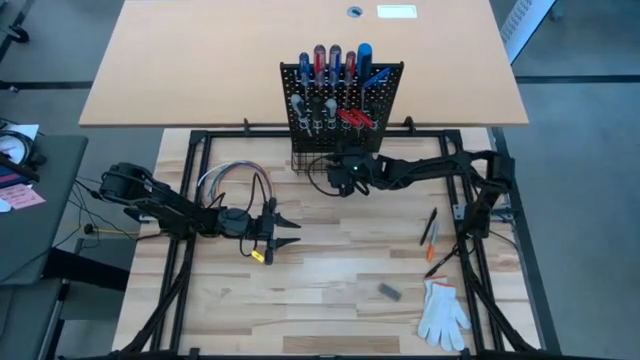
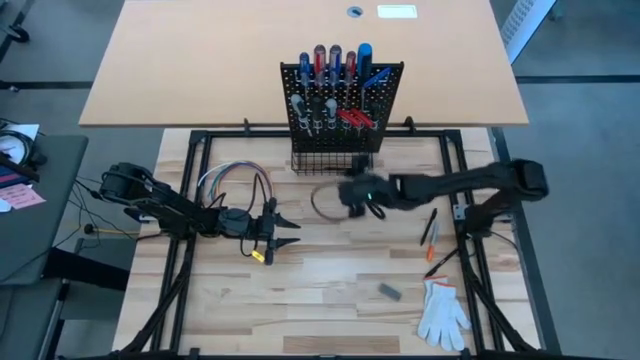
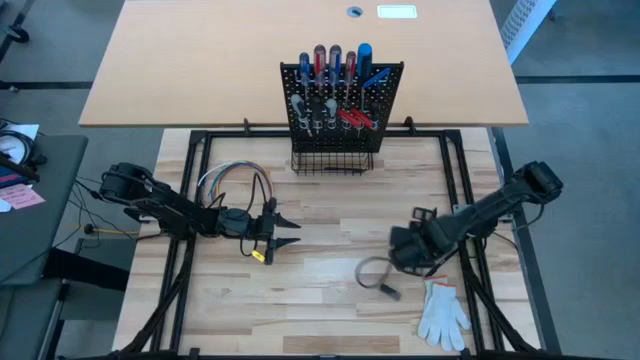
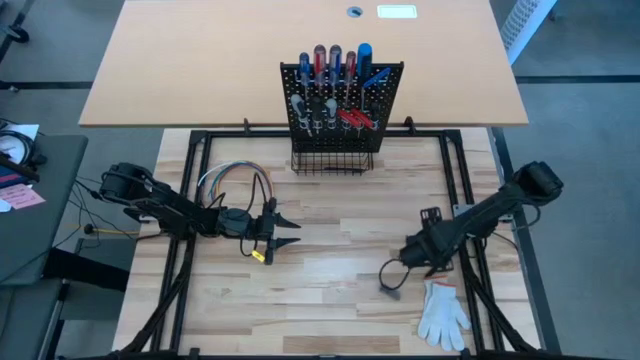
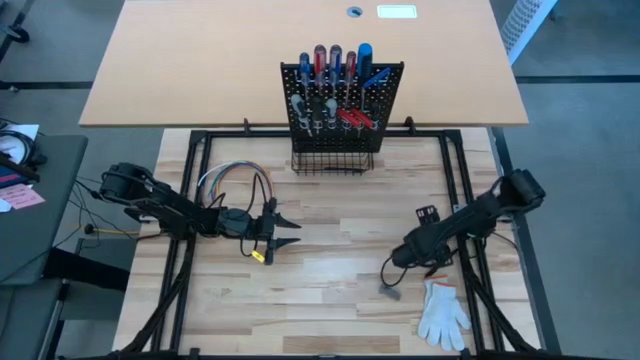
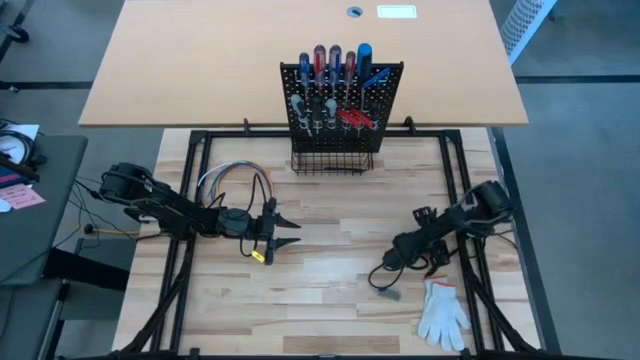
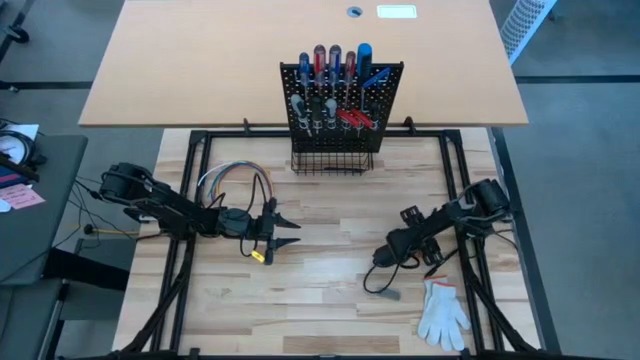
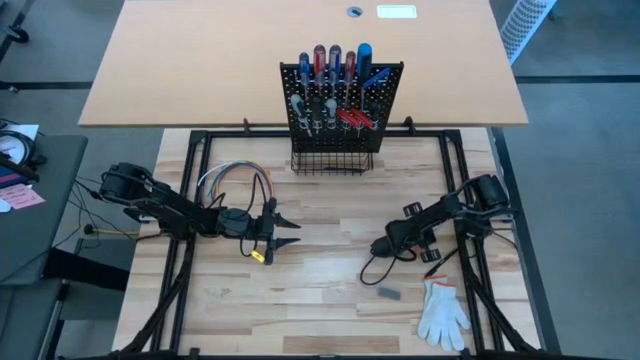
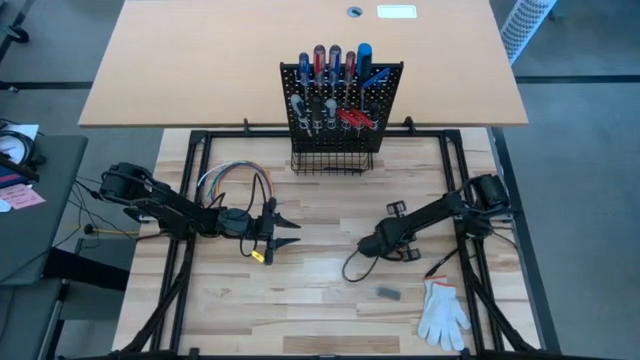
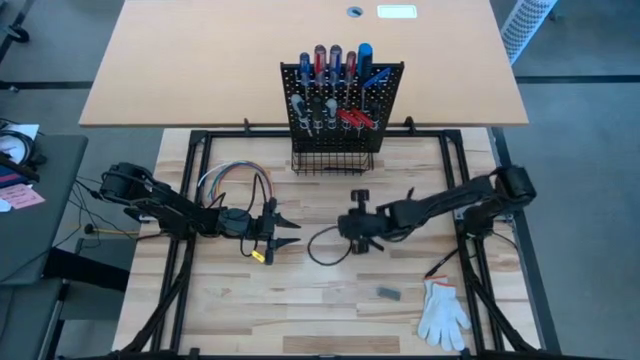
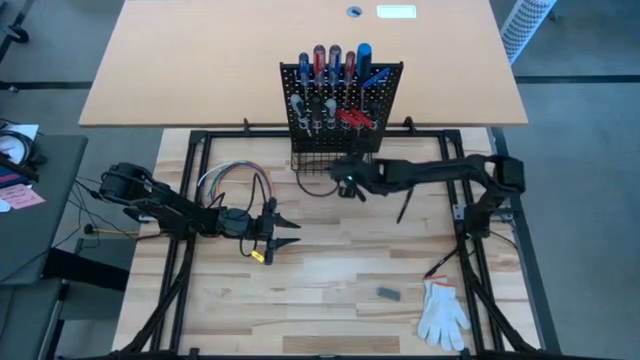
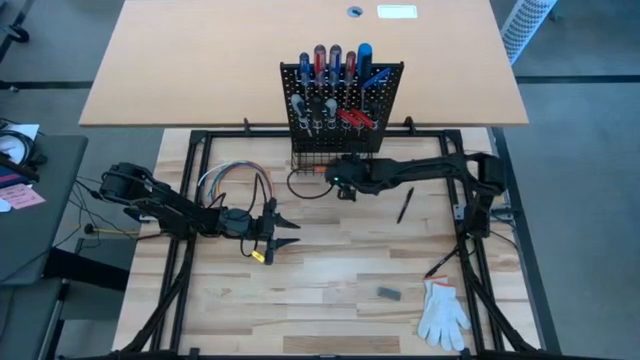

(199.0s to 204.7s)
Task: Hang tools onto peg board
Put the orange pen into the black basket

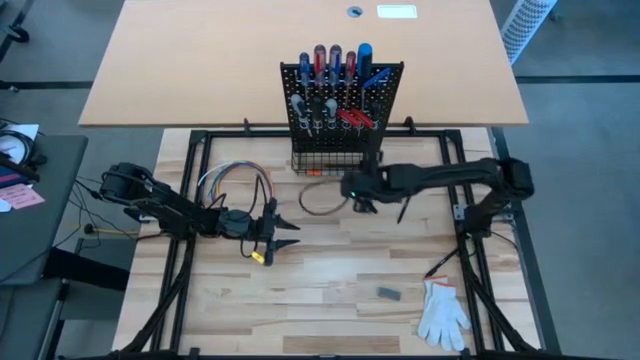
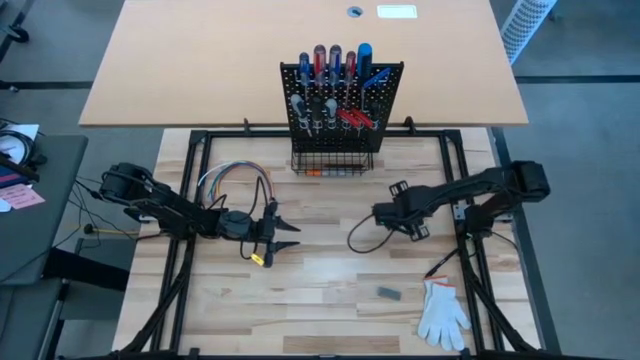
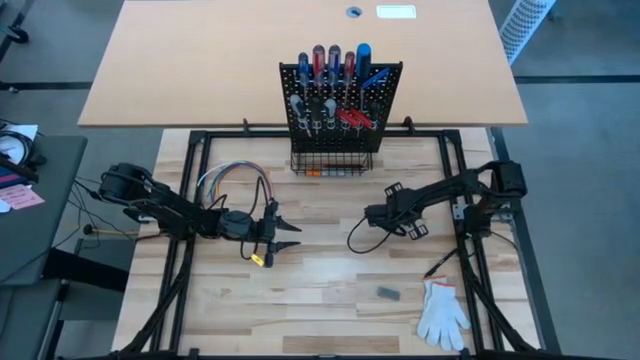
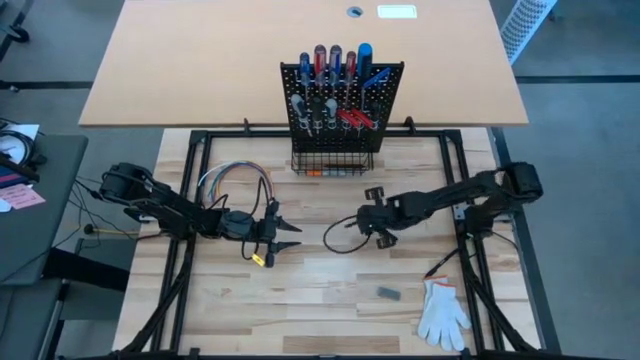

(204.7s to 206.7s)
Put the top black pen into the black basket

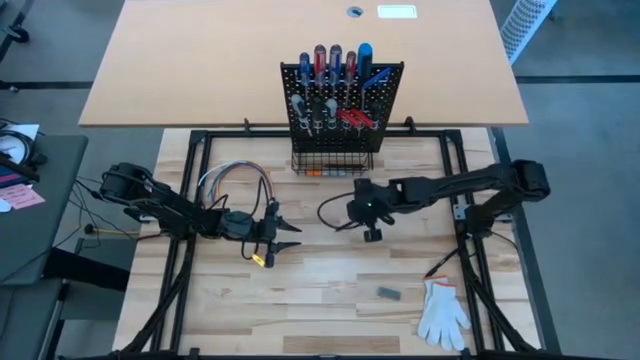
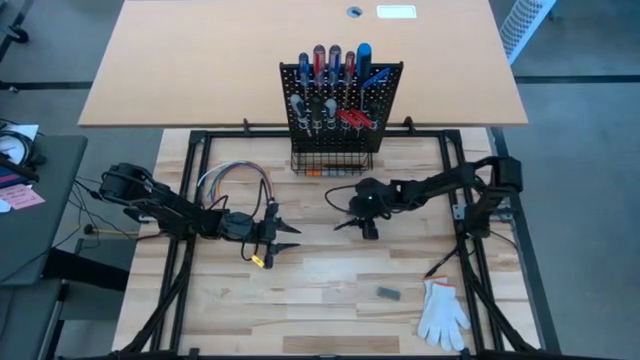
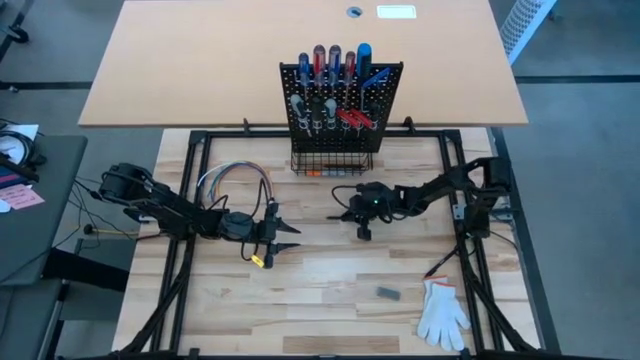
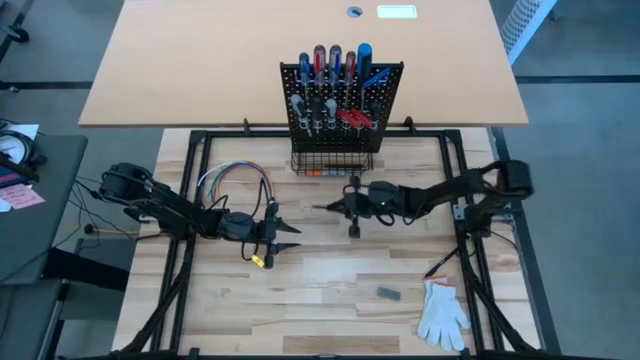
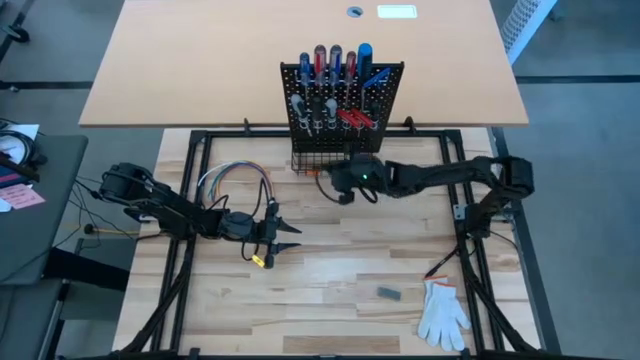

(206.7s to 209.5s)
Put the top black pen into the black basket

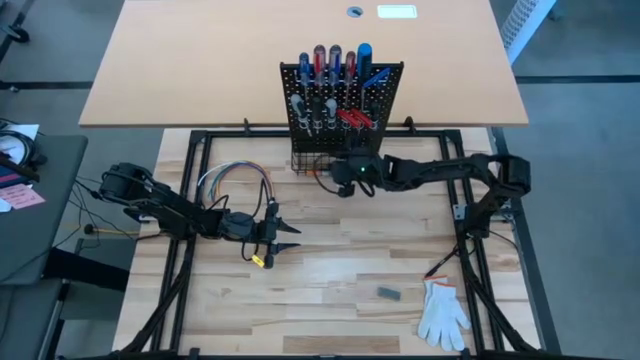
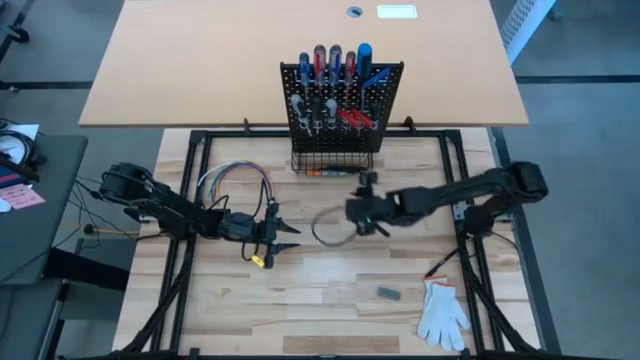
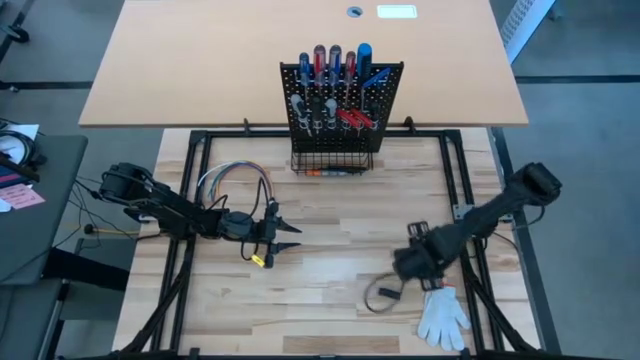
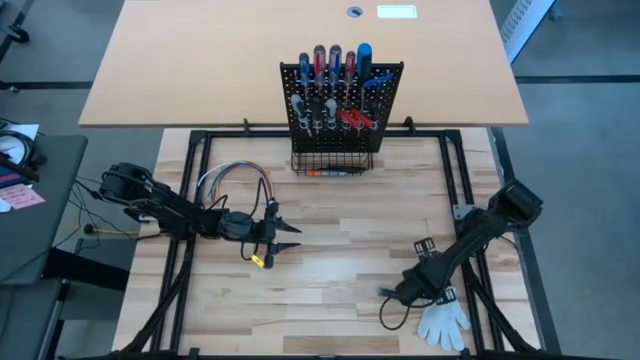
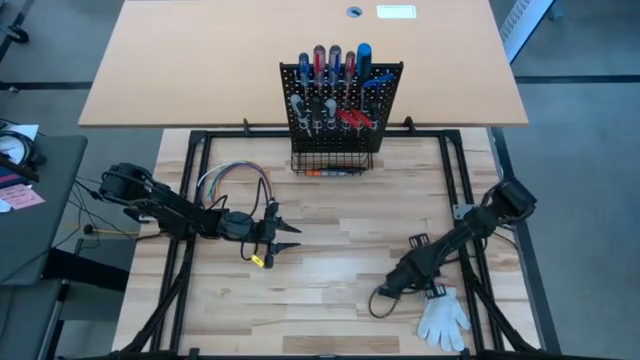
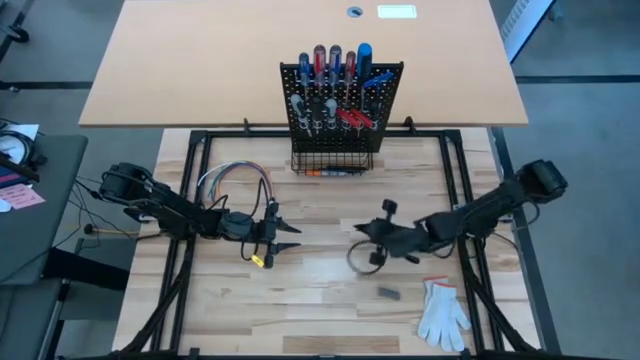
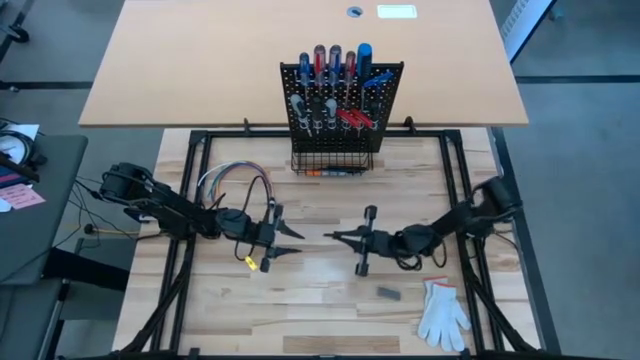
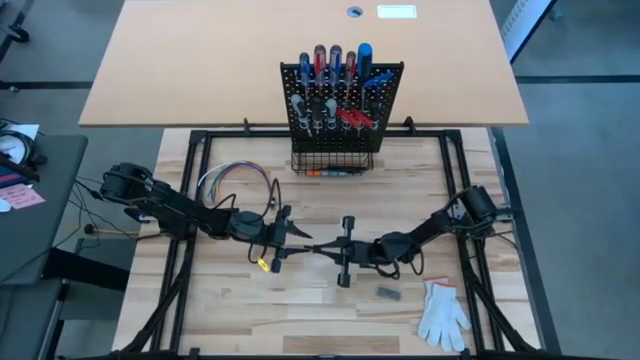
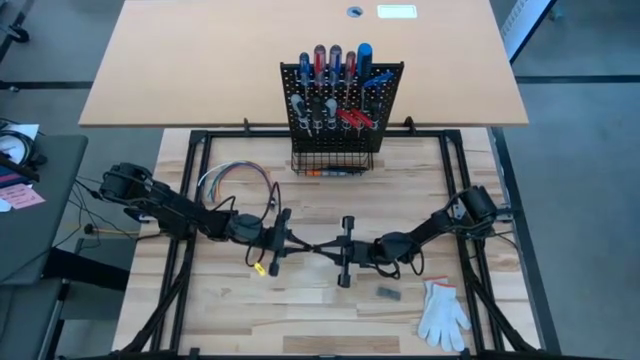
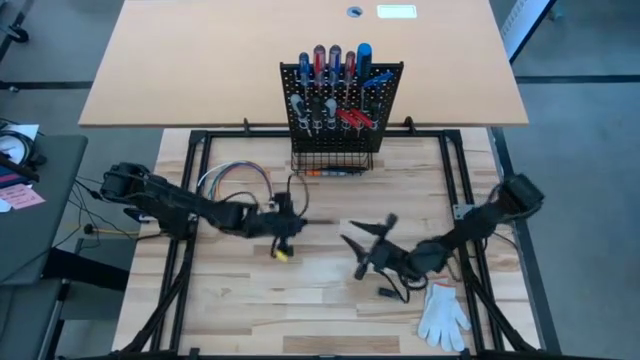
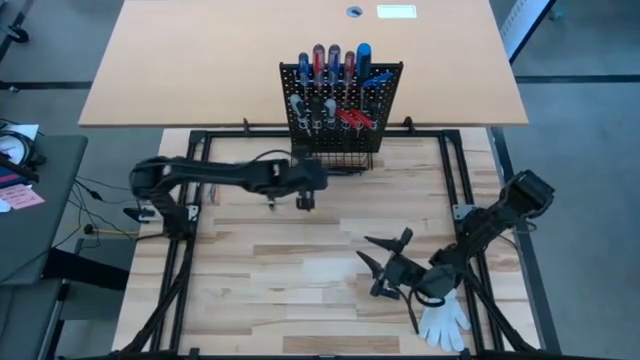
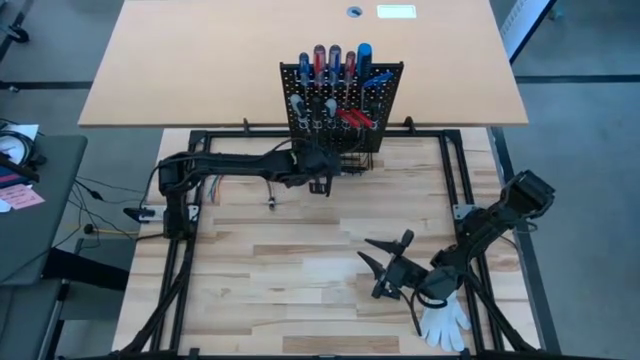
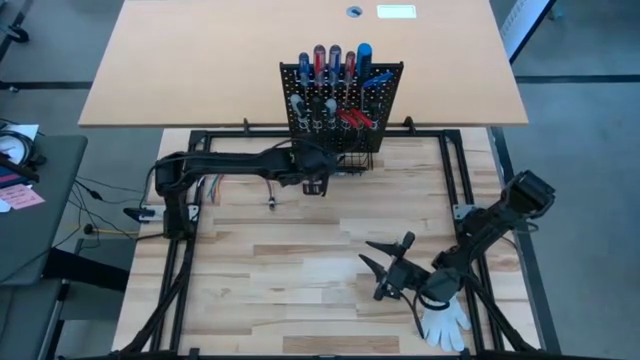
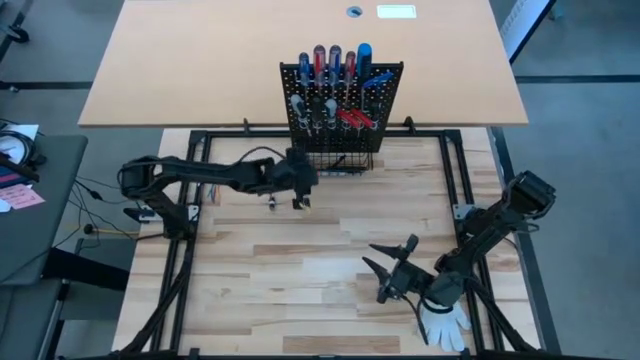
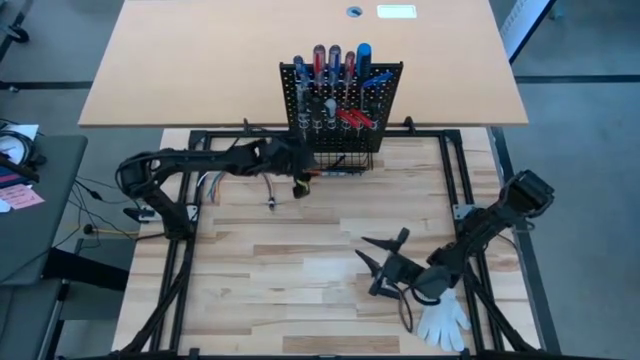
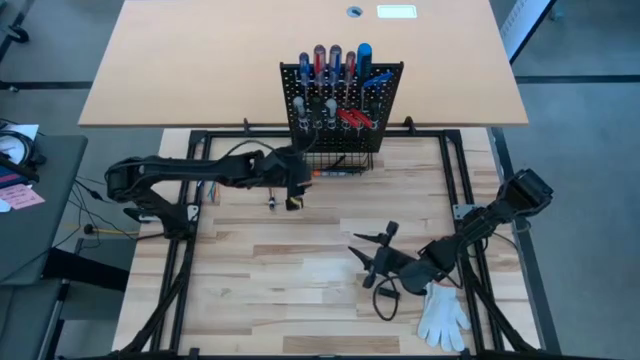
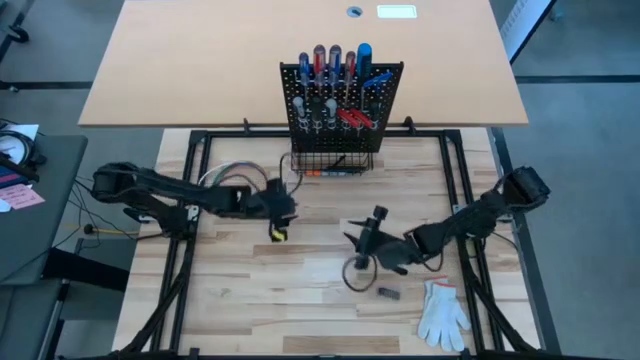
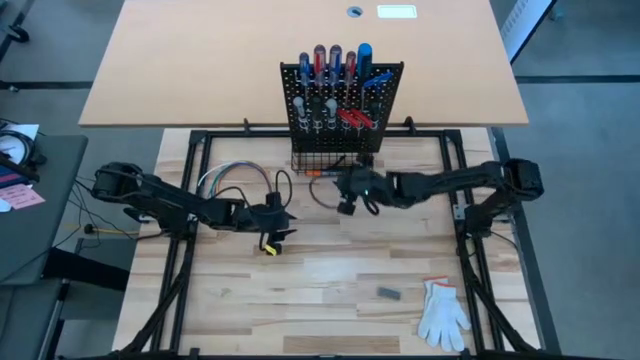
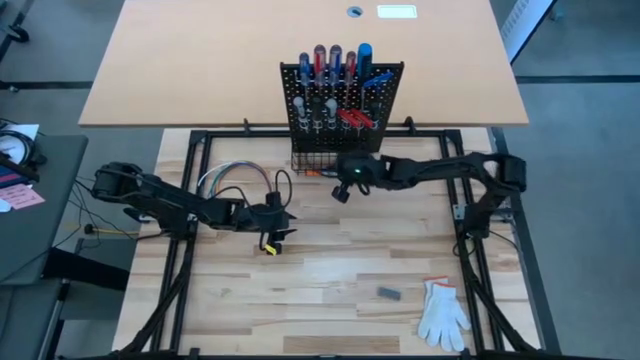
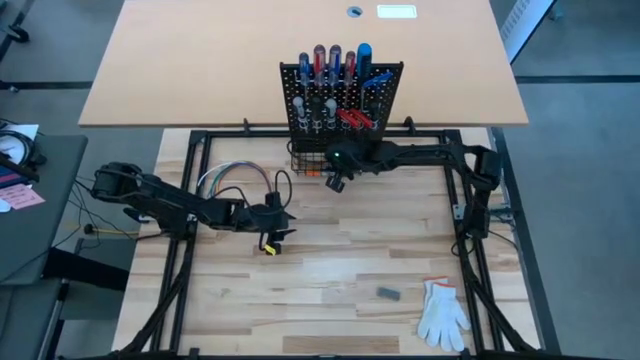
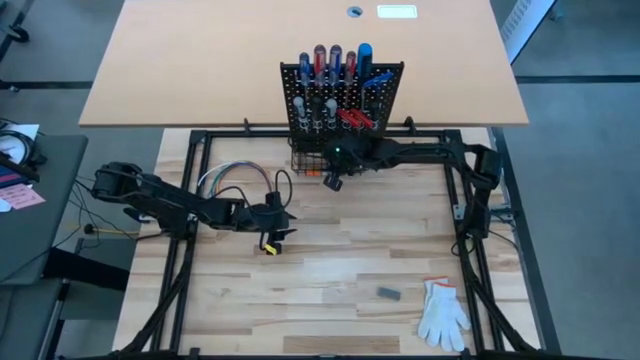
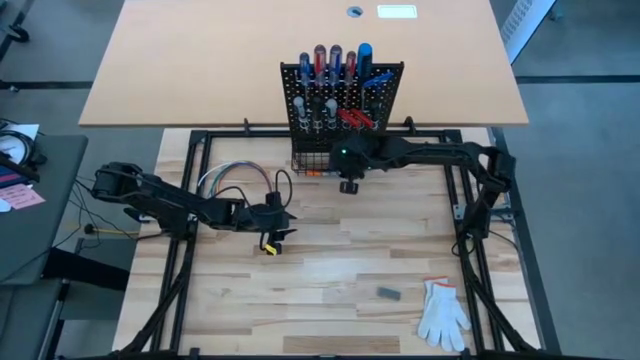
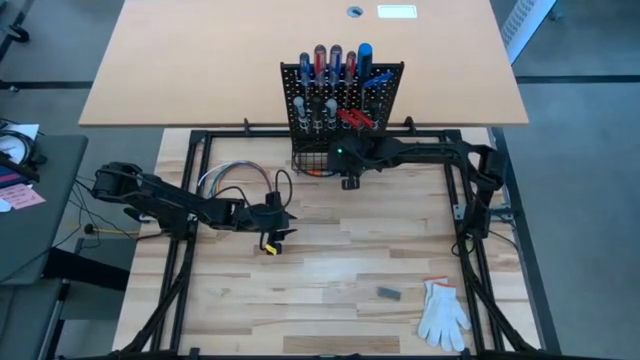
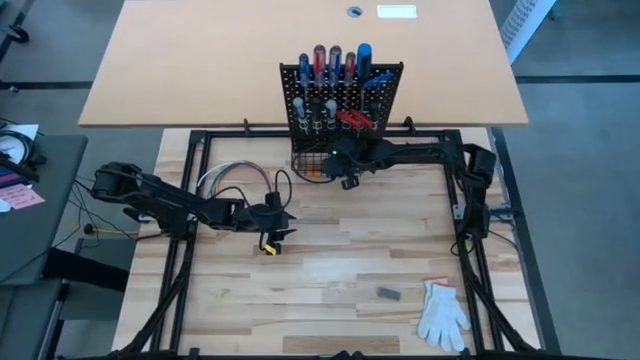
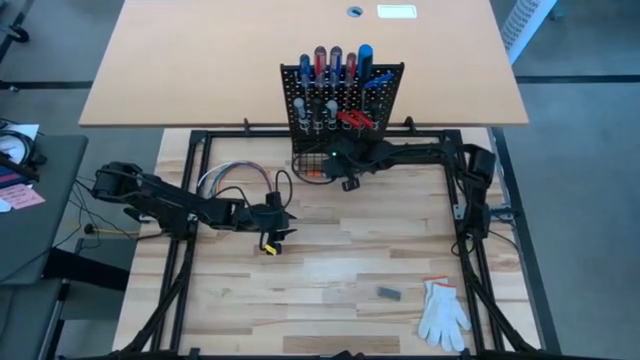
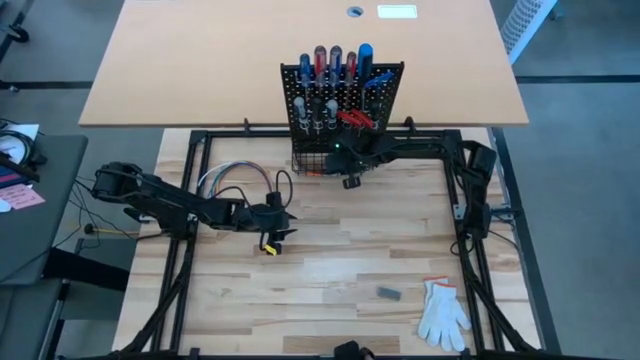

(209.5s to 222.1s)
Put the black pen into the black basket
